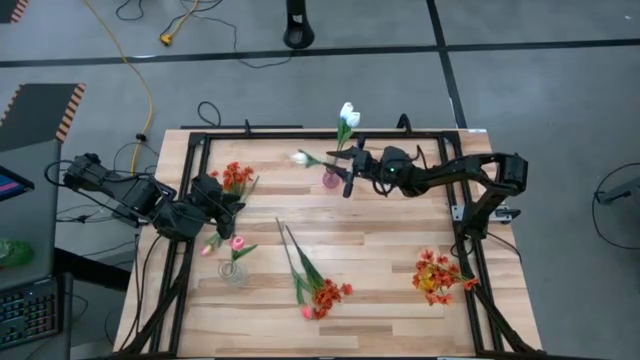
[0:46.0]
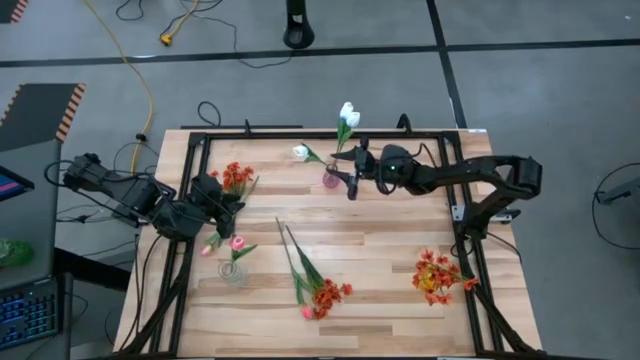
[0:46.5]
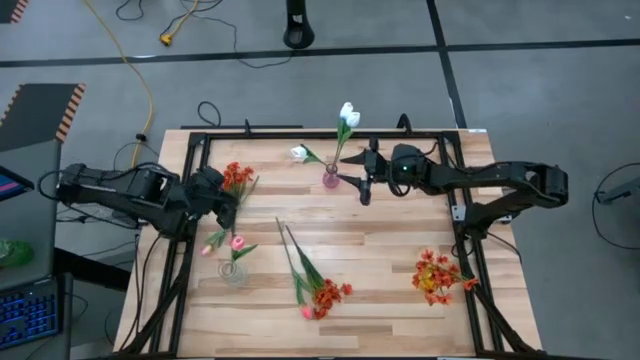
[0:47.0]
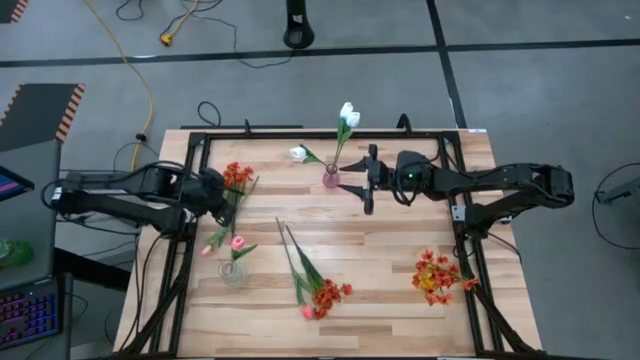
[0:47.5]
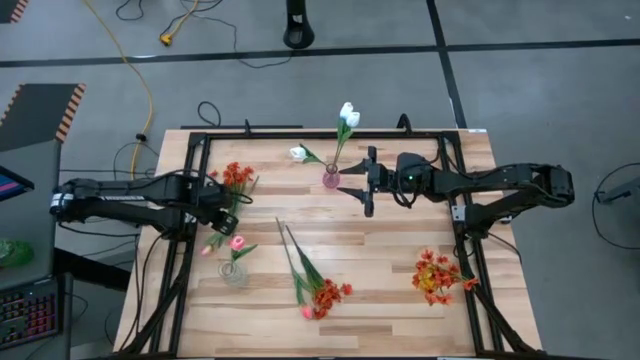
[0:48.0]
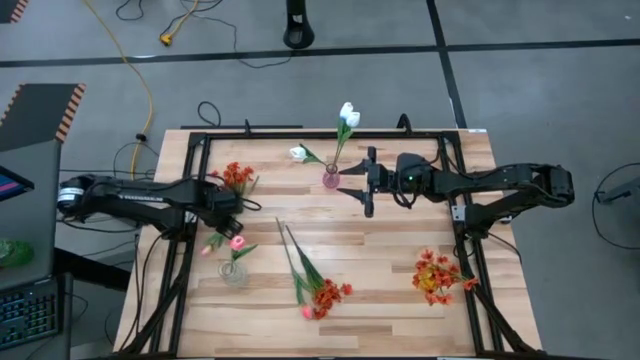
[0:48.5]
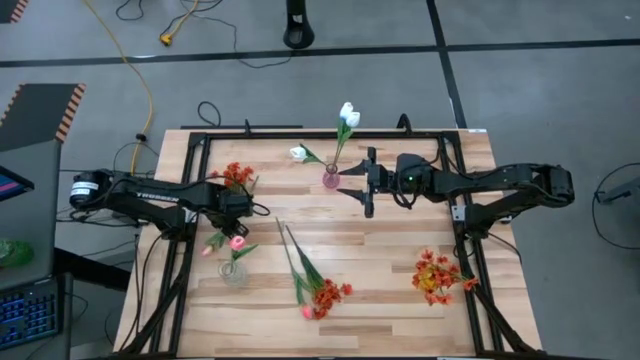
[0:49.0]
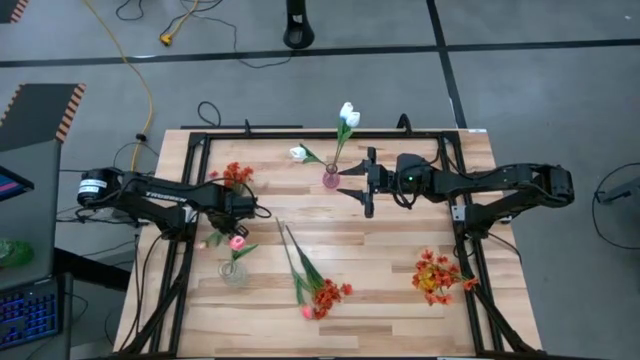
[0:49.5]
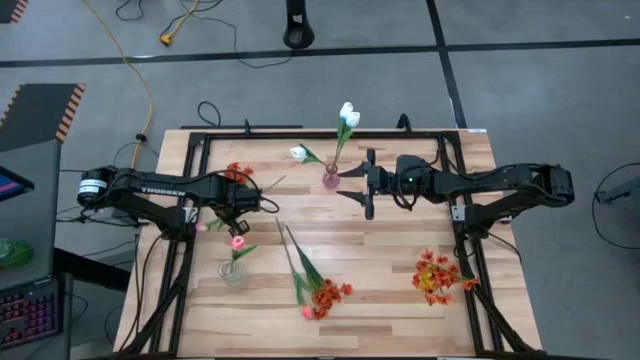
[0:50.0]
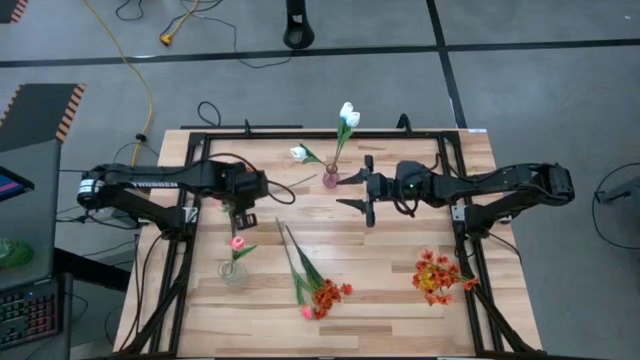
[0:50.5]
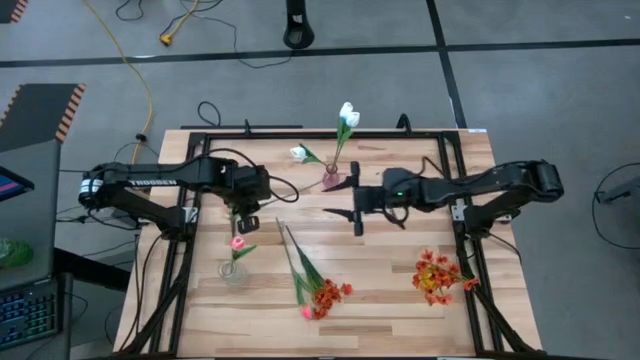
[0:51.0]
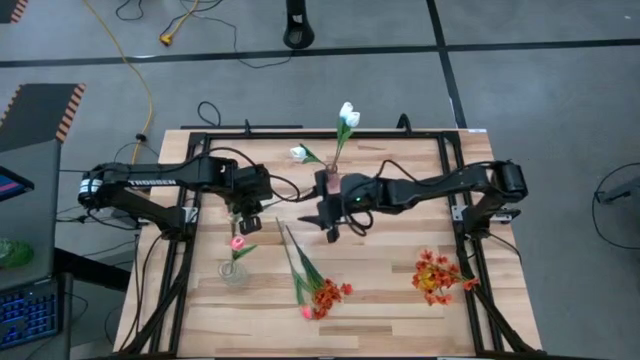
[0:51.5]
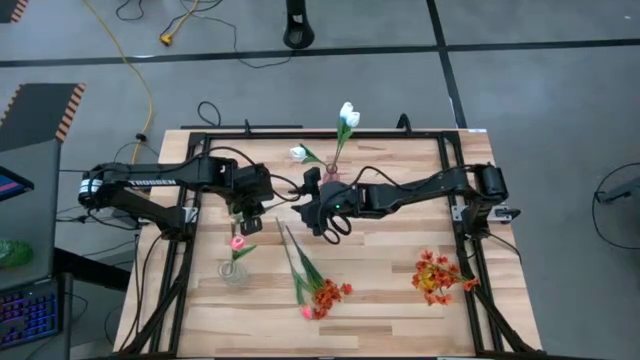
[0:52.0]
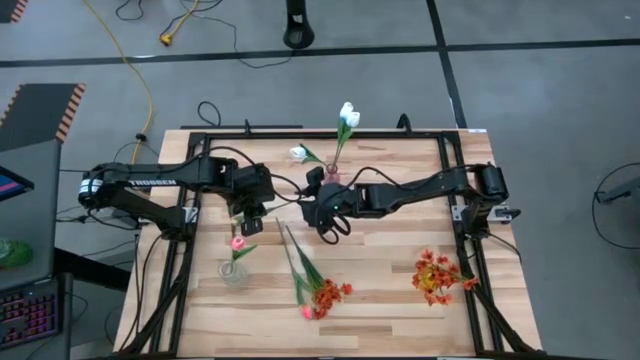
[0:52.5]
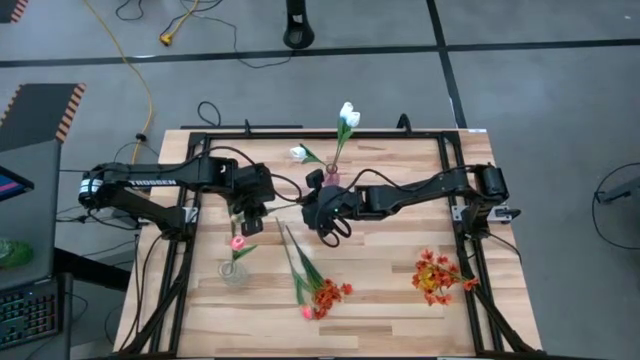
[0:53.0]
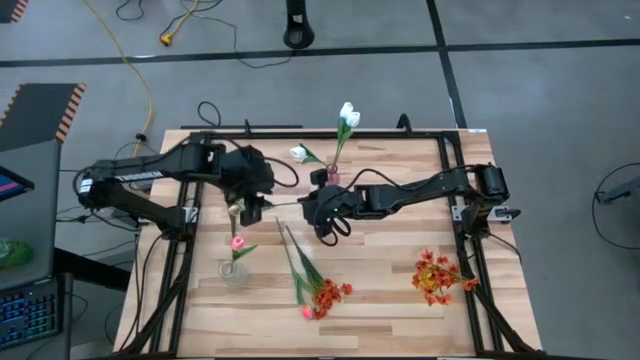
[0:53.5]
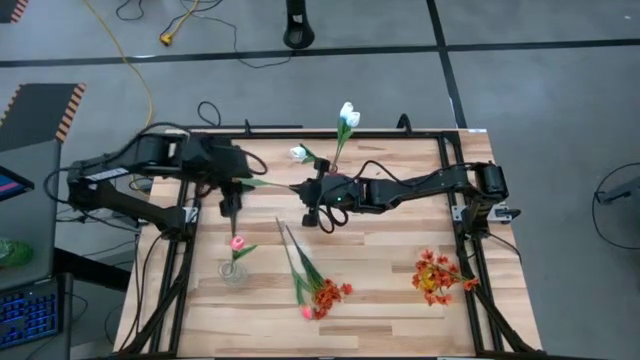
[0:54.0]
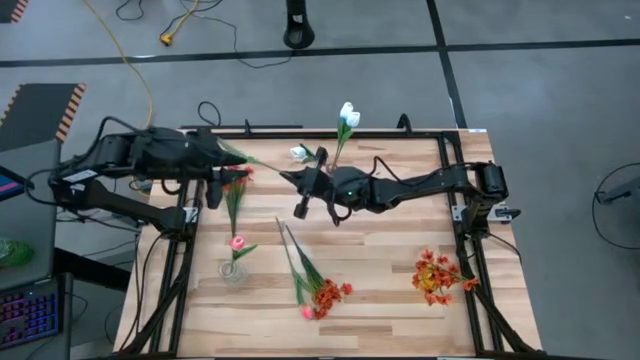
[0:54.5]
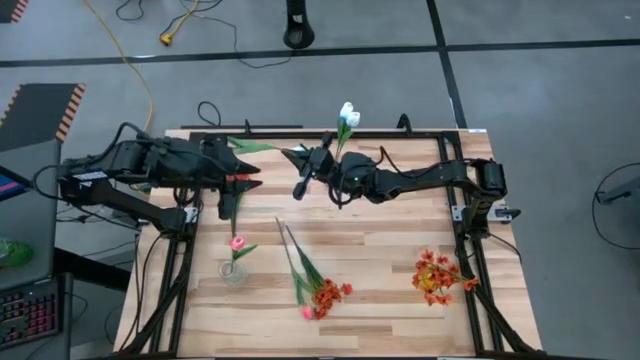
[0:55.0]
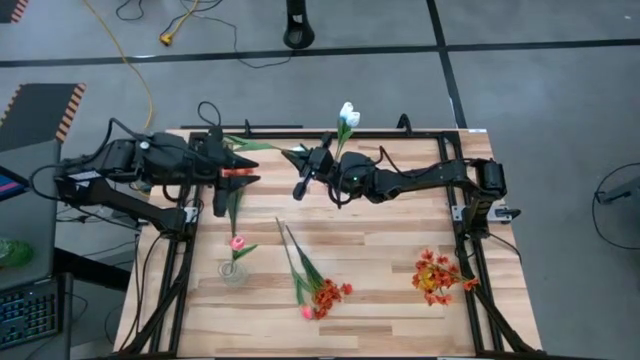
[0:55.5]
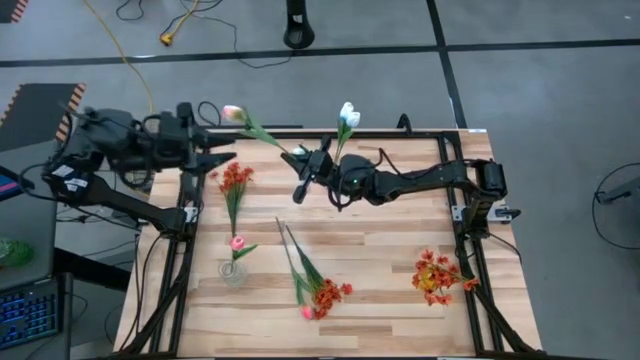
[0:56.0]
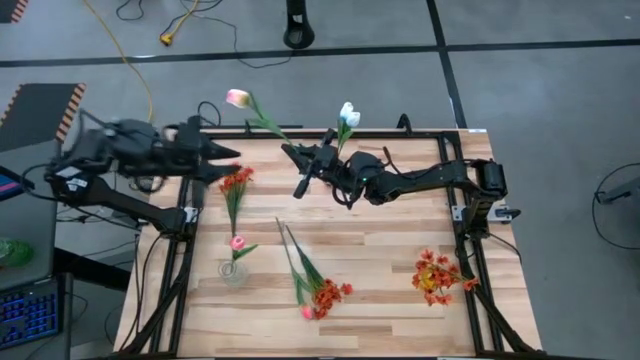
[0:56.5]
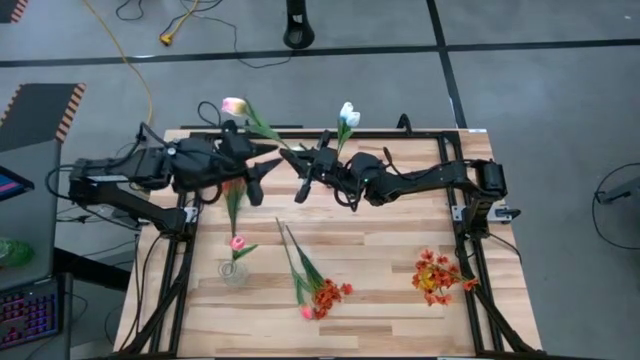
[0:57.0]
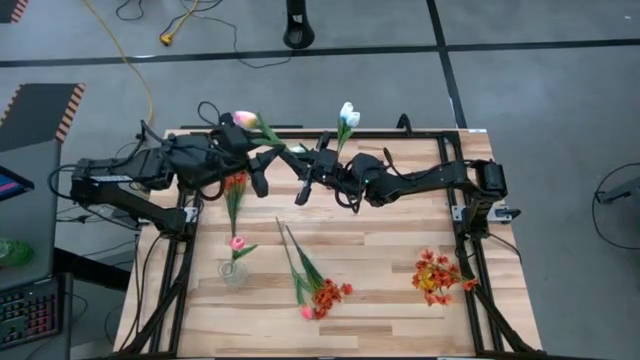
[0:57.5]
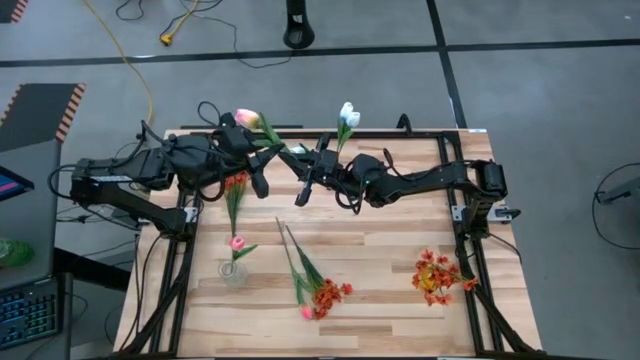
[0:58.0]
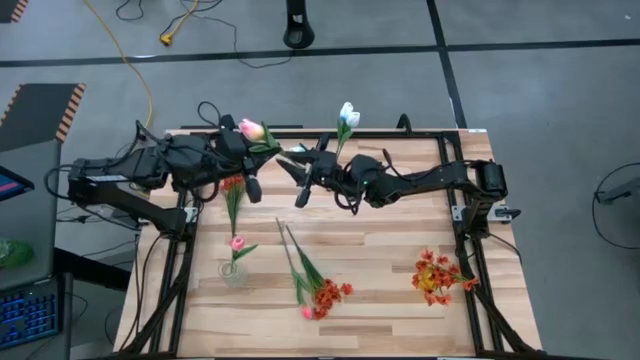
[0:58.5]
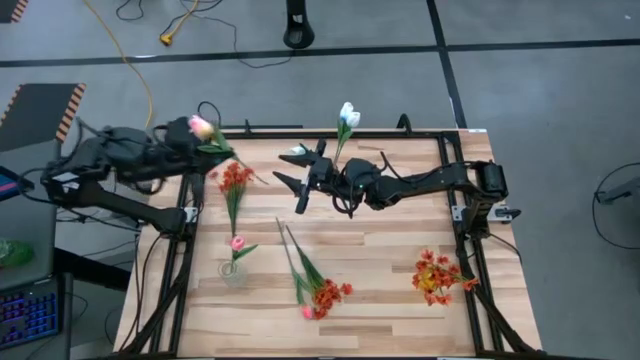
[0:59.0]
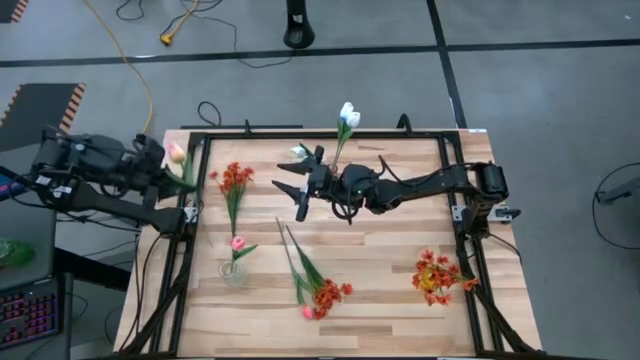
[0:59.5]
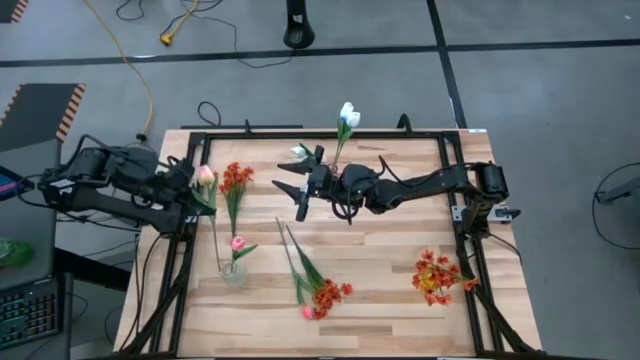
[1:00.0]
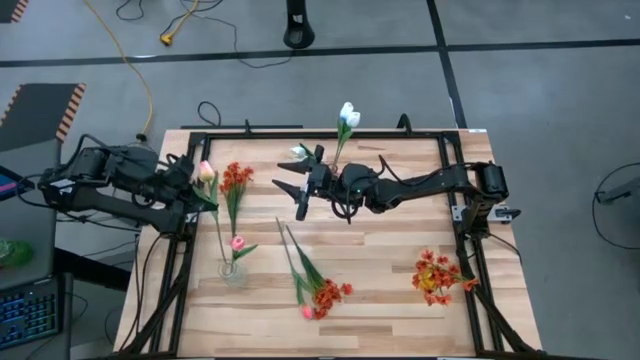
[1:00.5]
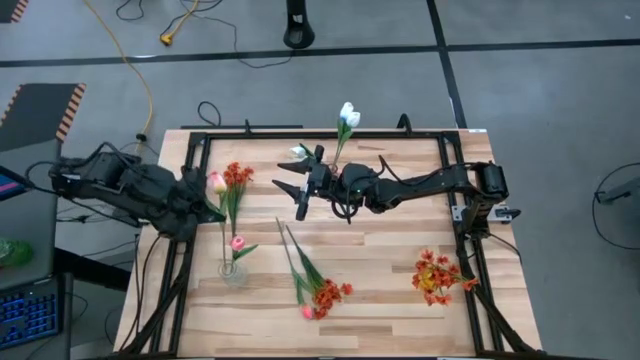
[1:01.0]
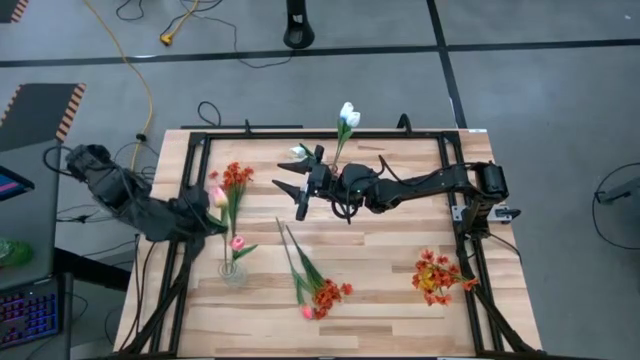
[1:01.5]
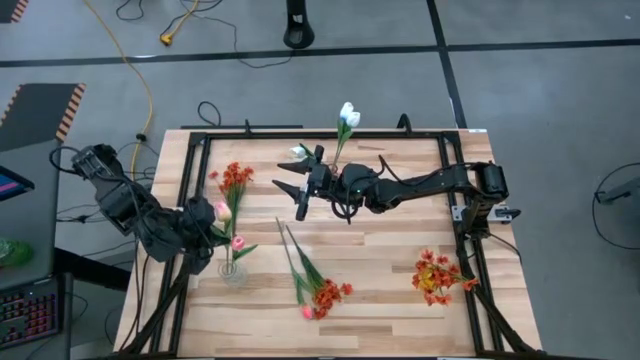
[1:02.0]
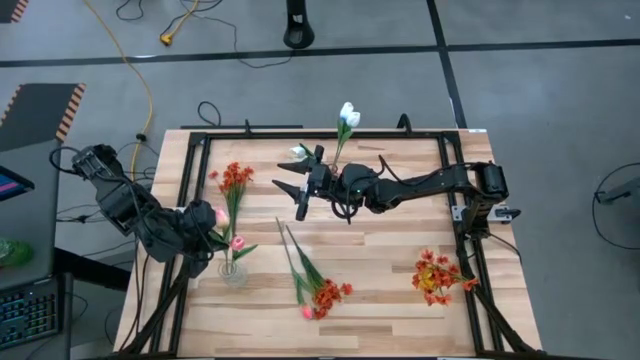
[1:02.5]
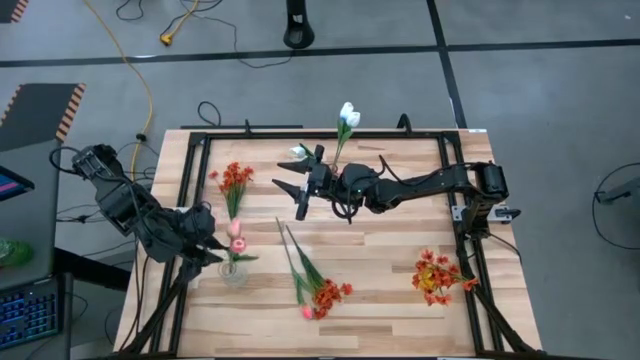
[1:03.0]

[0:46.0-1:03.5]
Task: Sort flowers into vase by color
Put left pink flower into the transparent vase

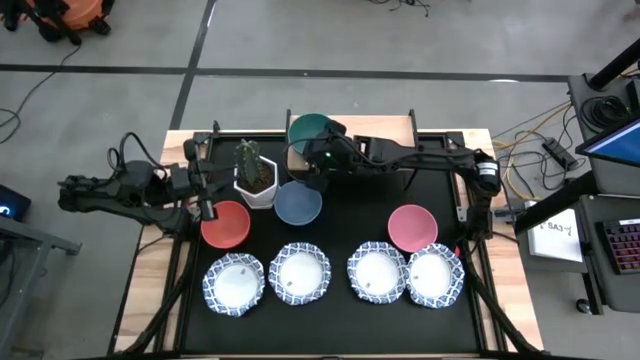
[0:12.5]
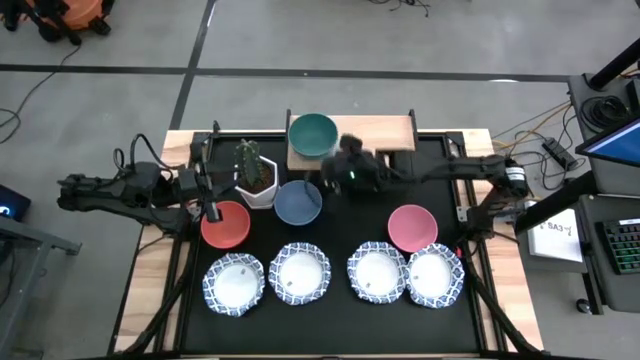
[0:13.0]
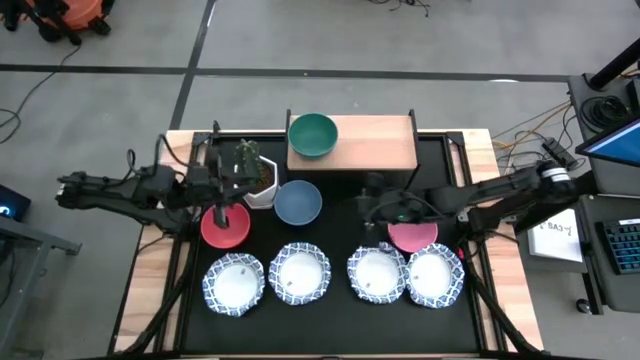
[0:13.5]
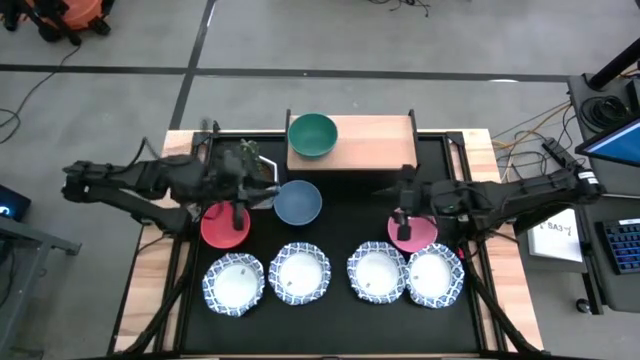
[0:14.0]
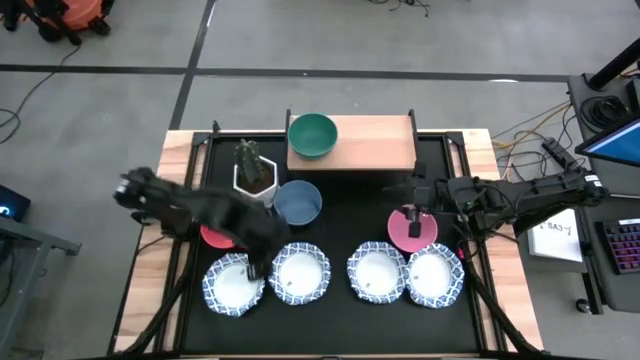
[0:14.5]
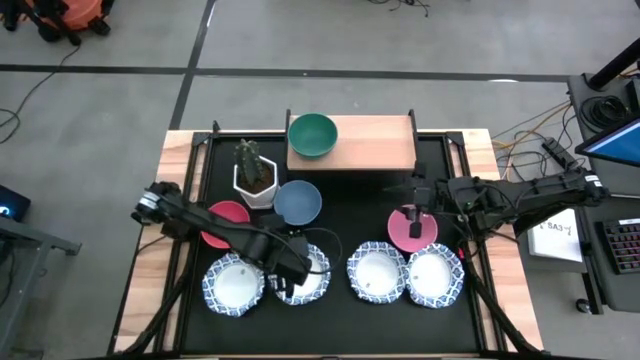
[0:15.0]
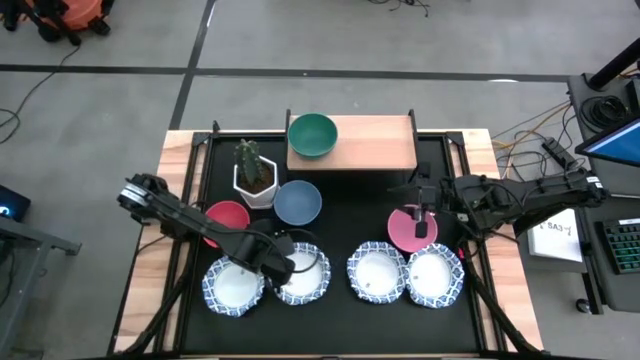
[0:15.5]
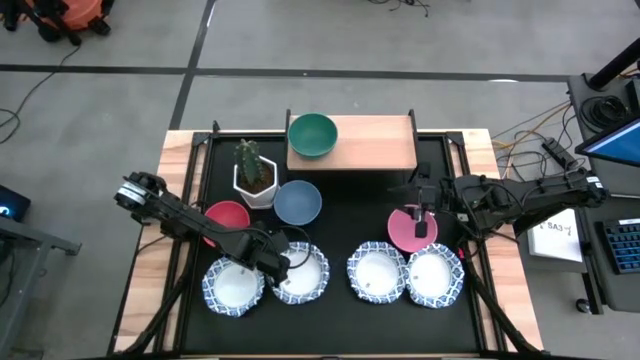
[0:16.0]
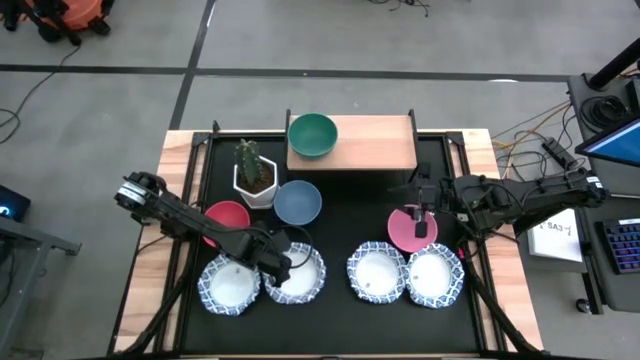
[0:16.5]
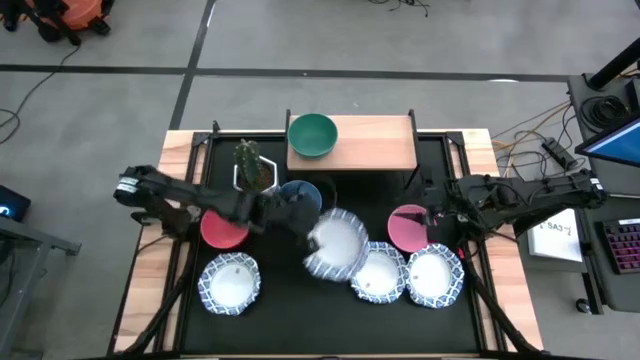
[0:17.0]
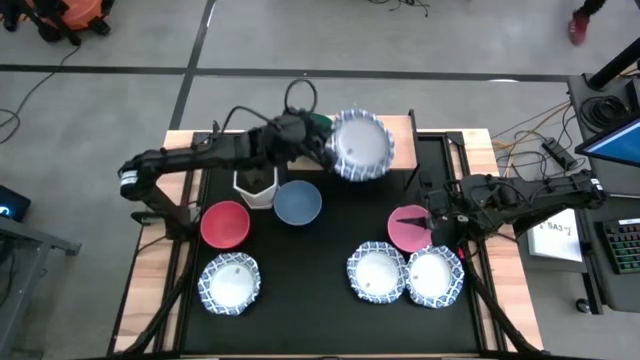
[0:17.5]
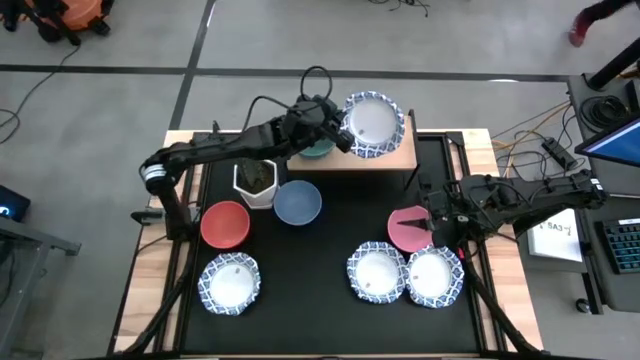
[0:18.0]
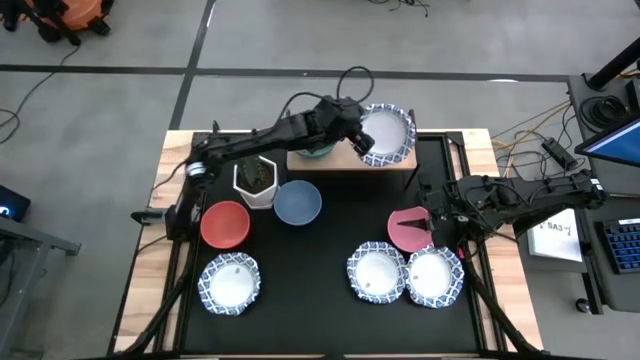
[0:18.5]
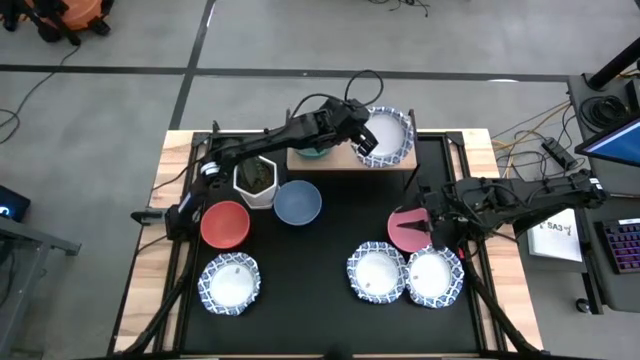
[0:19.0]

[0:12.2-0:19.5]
Task: Place and stack bowls onto a shelf
Put the blue patterned bowl on the shelf
